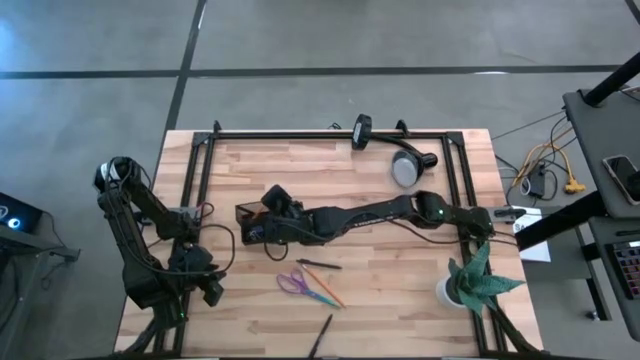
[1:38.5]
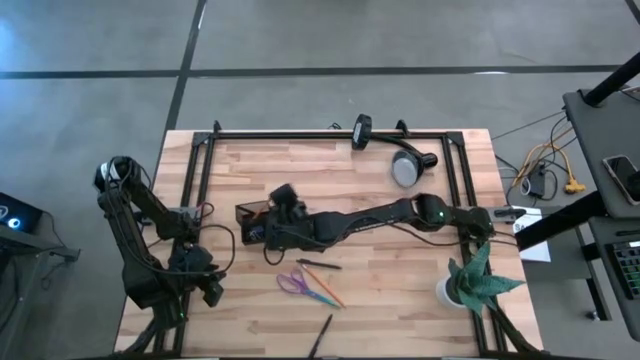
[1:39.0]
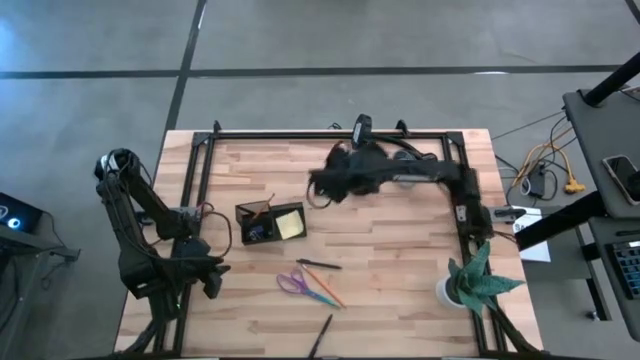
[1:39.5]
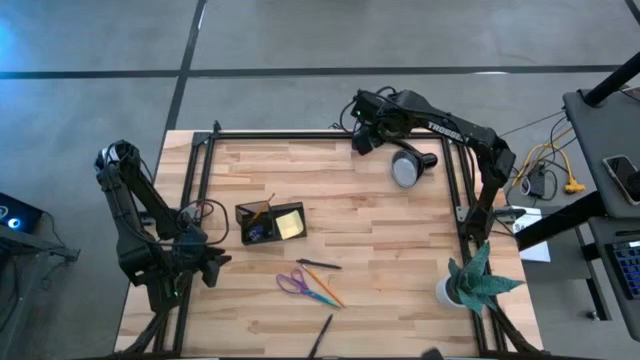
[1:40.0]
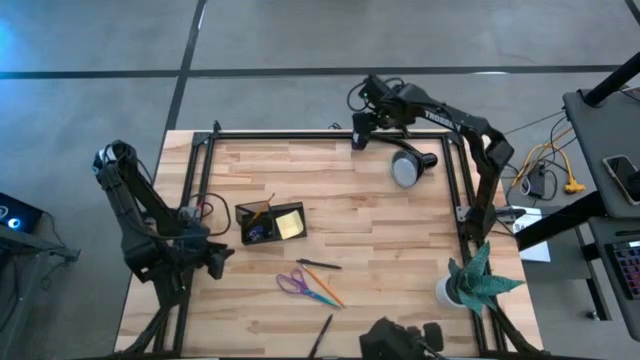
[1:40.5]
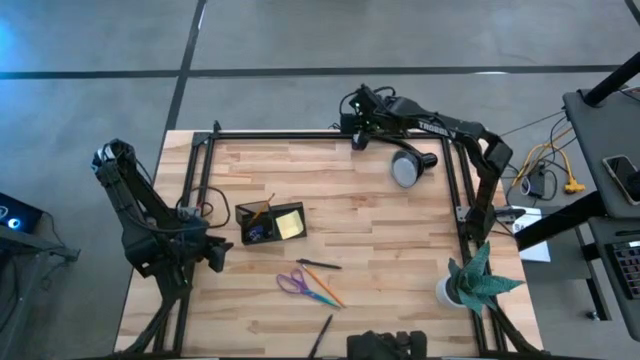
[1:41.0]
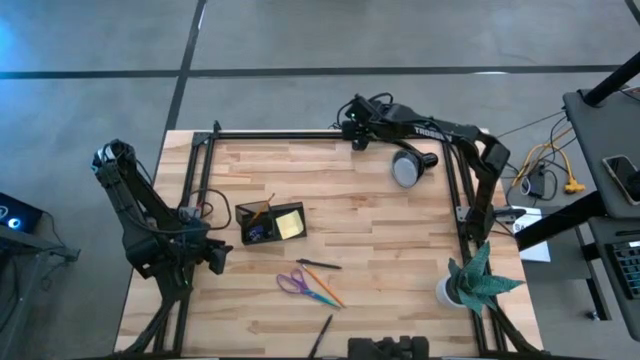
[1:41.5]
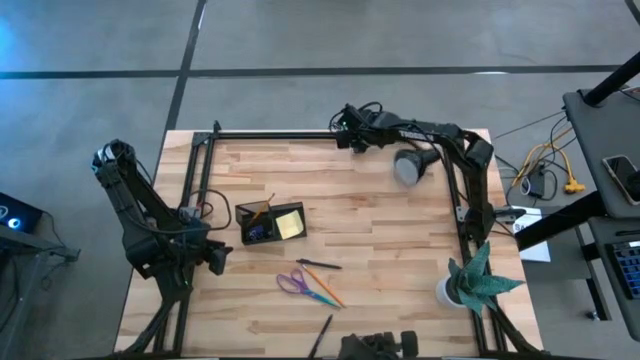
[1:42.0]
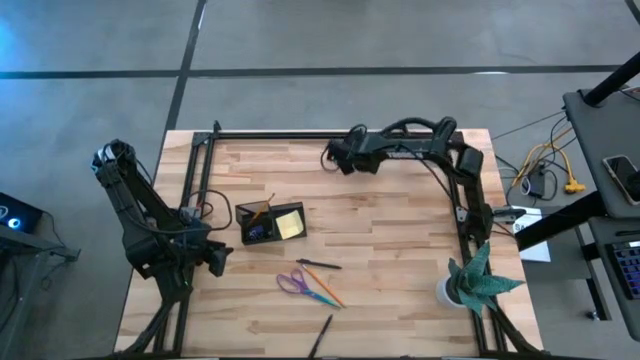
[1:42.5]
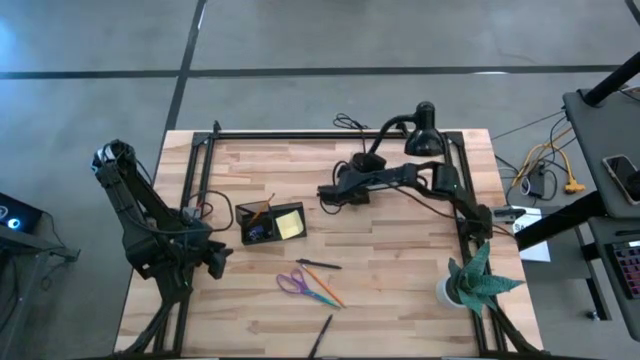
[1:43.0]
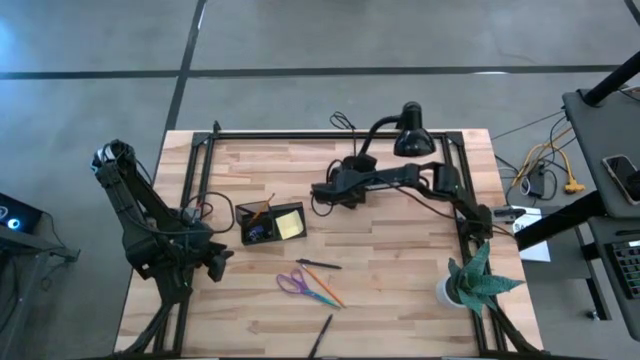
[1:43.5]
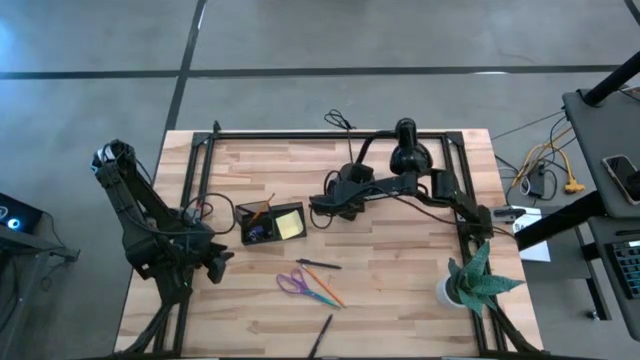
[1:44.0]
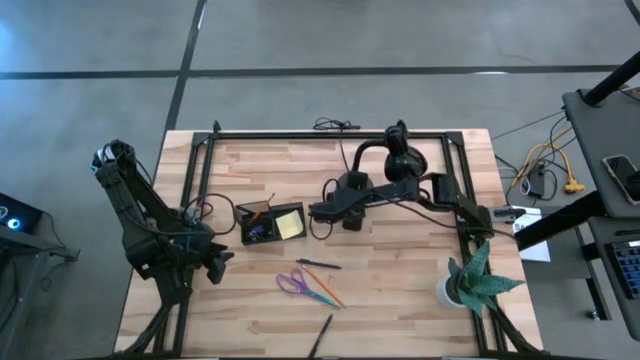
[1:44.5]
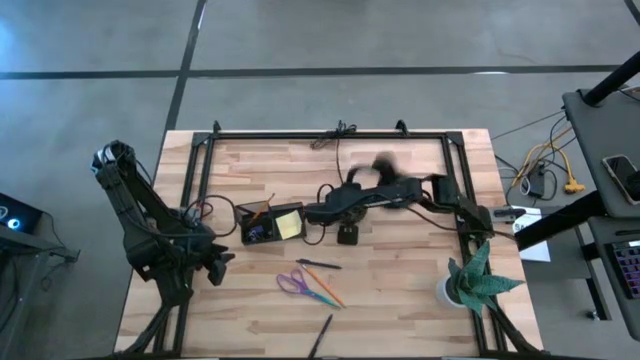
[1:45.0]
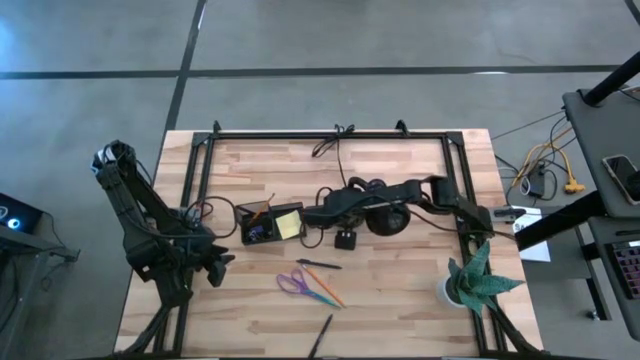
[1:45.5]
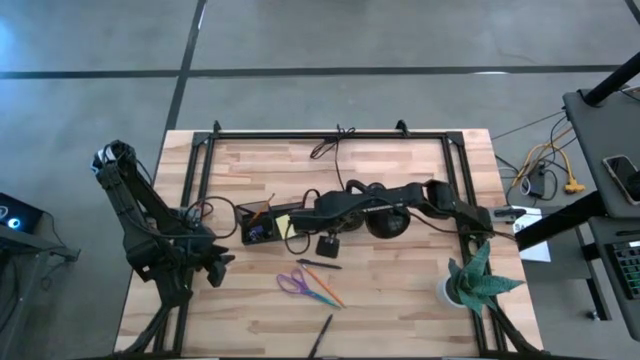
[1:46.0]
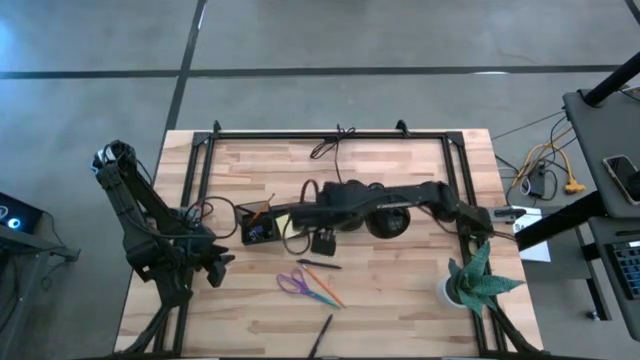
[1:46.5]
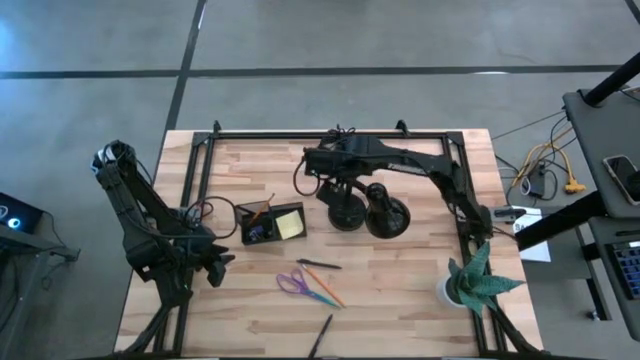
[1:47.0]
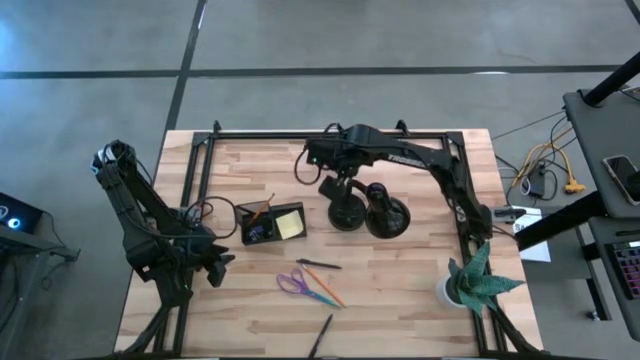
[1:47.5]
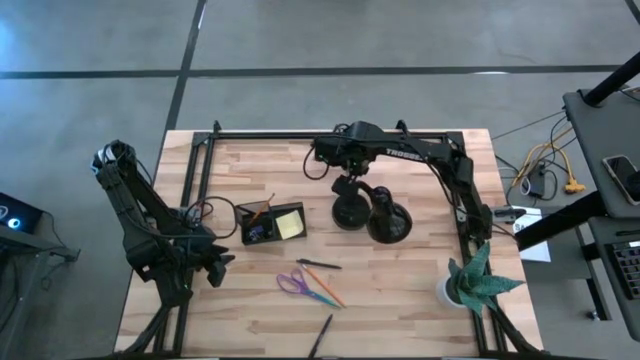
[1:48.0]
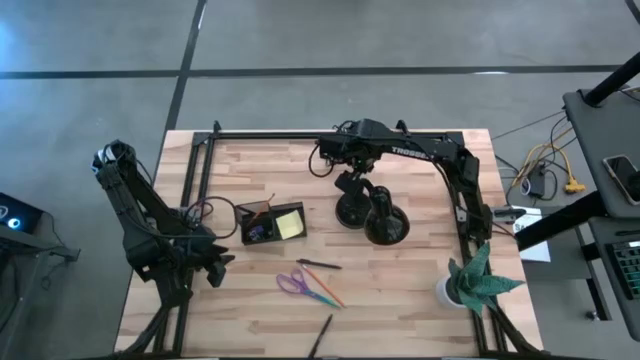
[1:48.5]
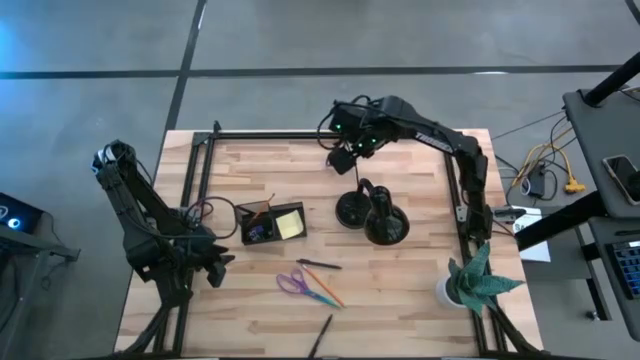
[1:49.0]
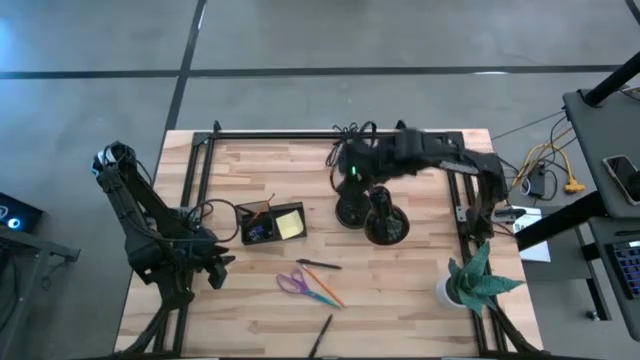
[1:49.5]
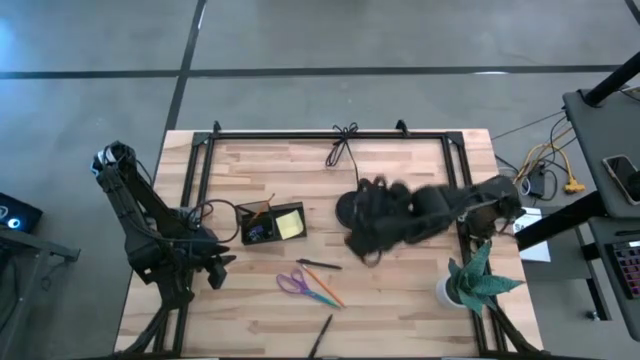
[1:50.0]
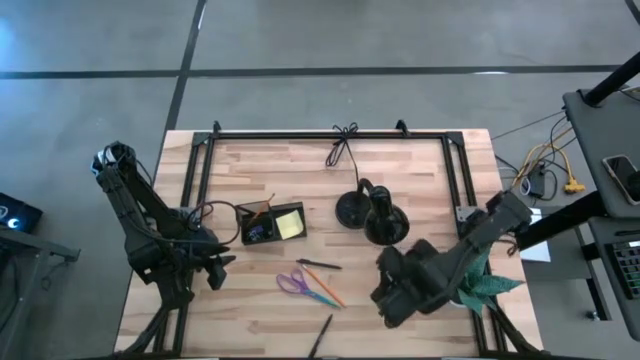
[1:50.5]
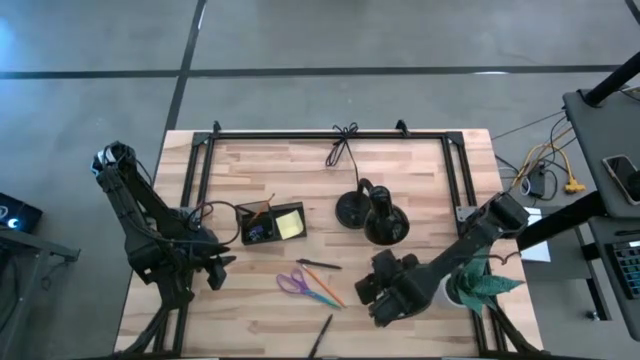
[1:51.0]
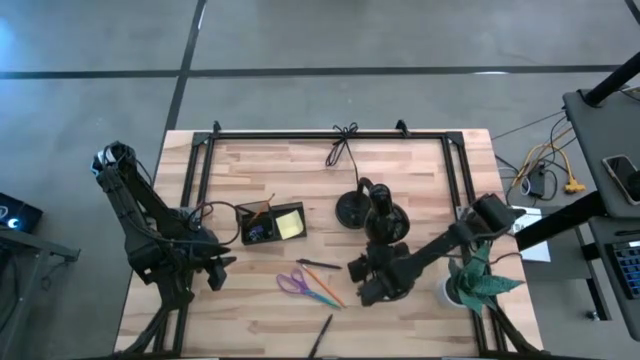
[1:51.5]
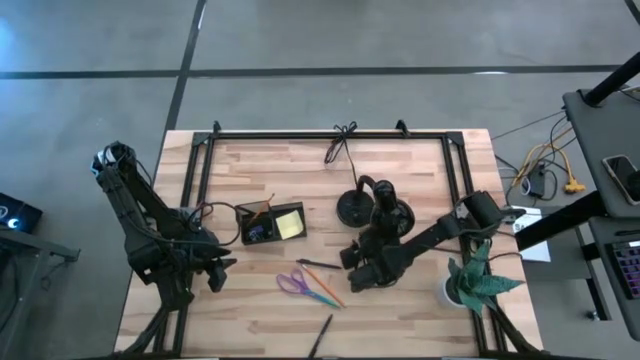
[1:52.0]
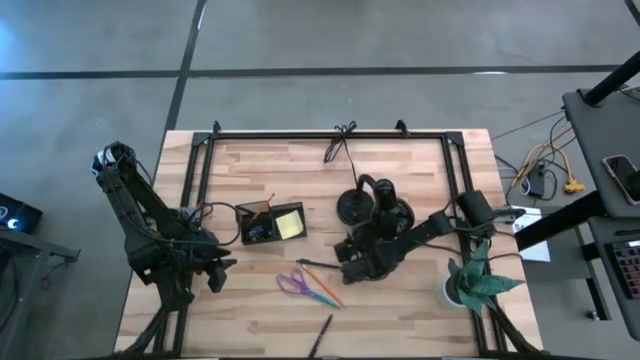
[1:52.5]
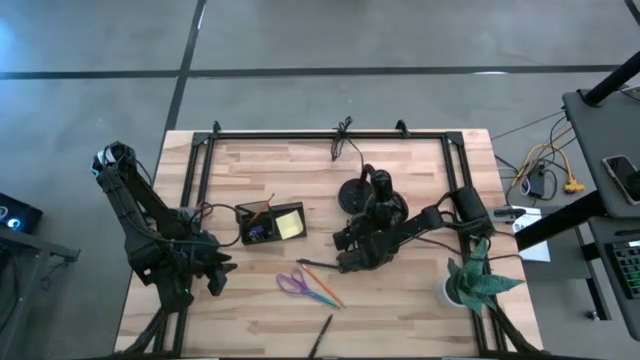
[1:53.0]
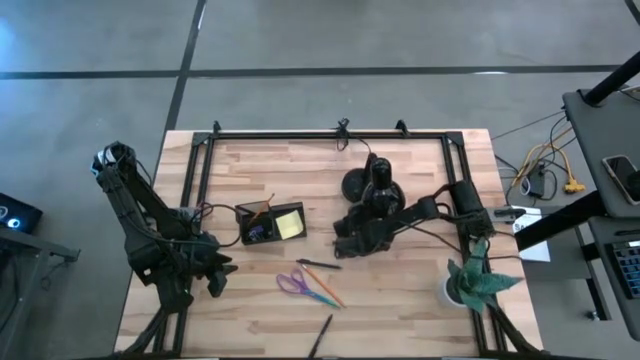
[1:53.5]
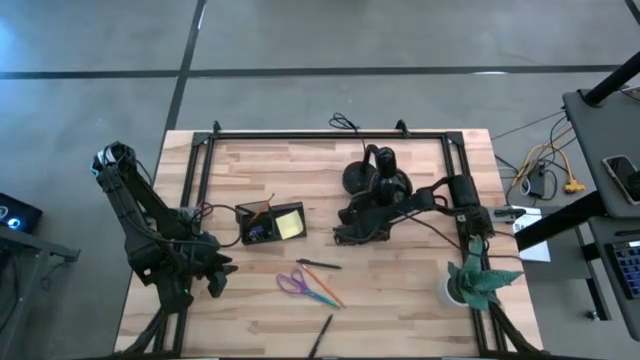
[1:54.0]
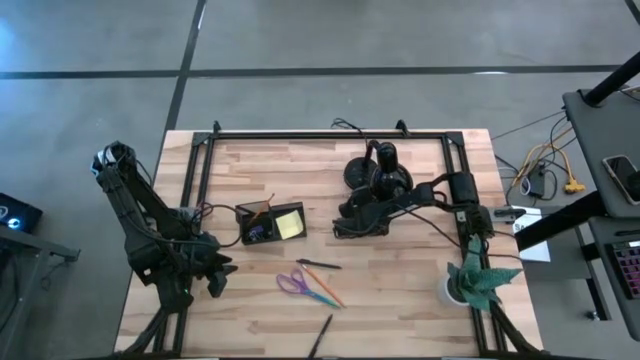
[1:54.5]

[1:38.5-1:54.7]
Task: Pick and place office supplies into organizer
Adjust the black lamp

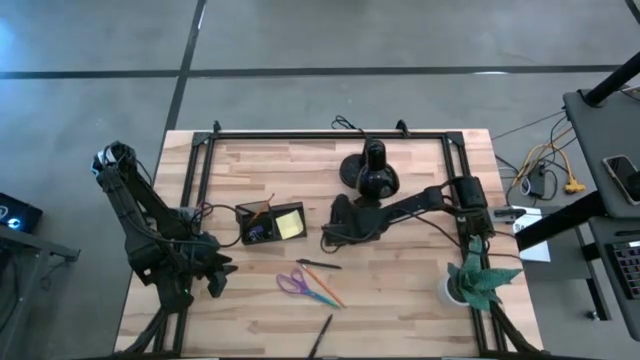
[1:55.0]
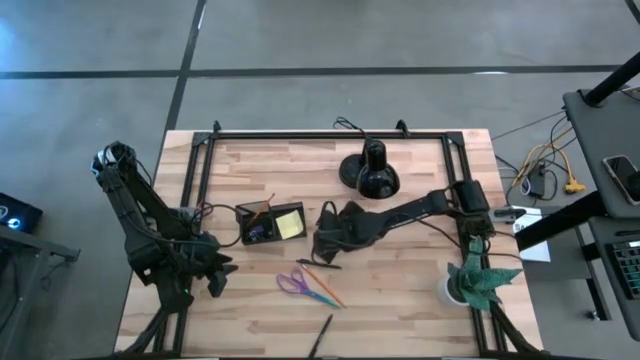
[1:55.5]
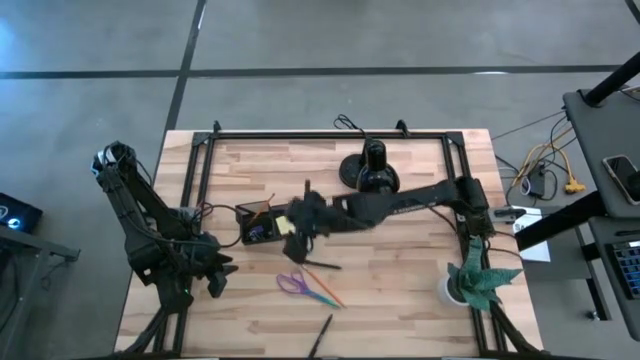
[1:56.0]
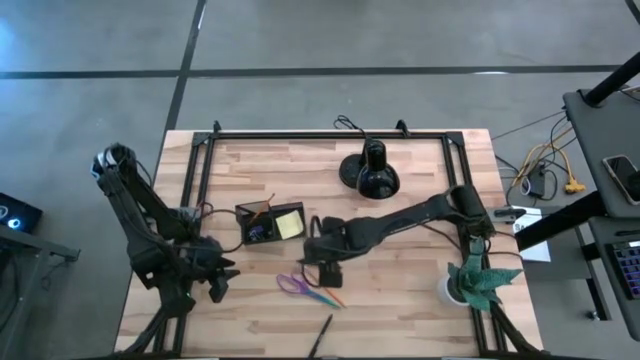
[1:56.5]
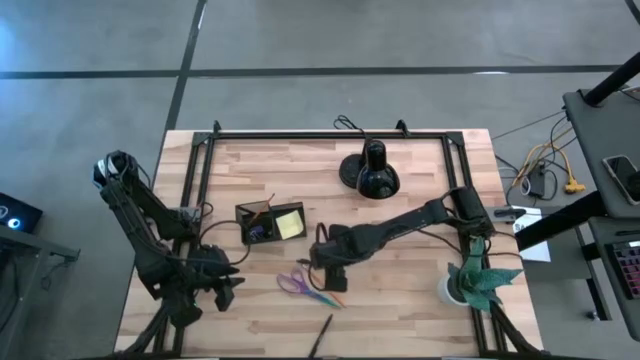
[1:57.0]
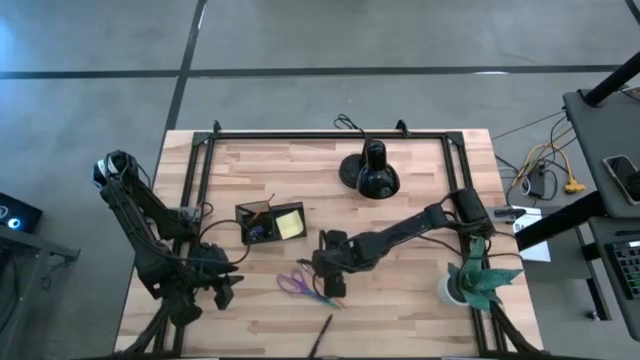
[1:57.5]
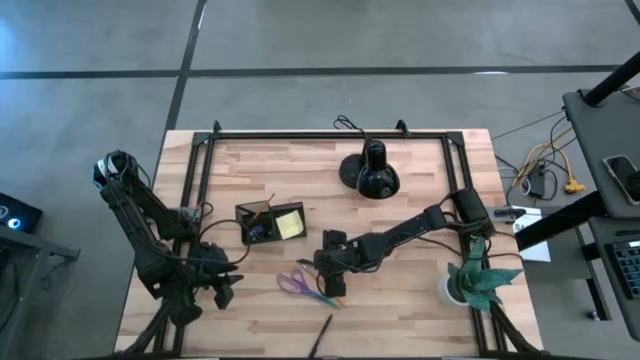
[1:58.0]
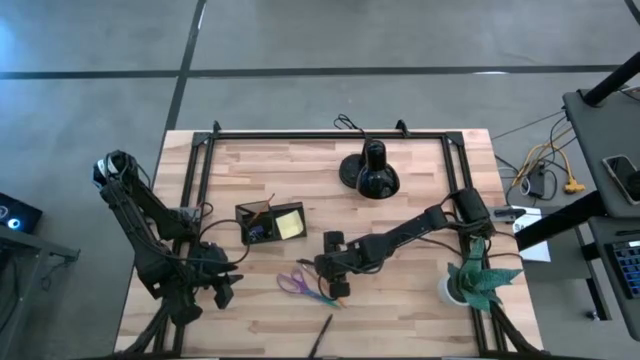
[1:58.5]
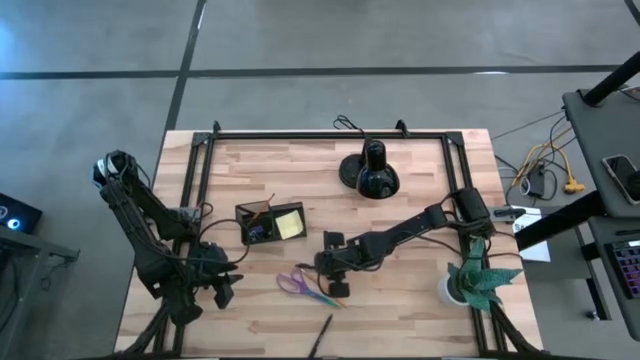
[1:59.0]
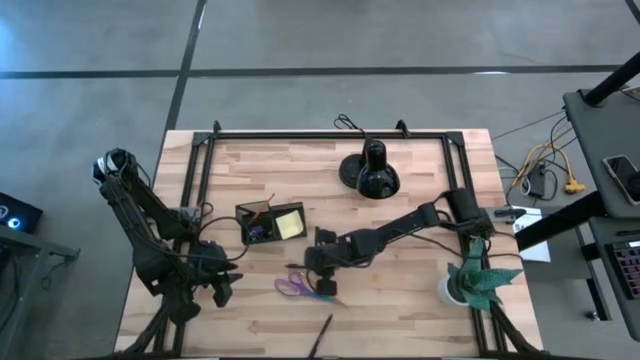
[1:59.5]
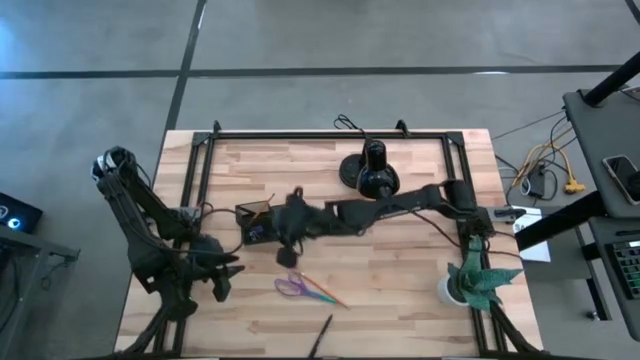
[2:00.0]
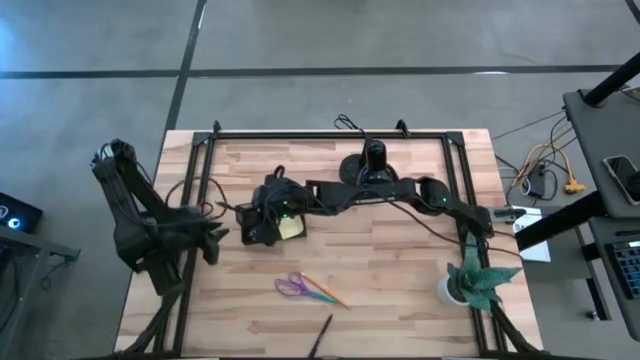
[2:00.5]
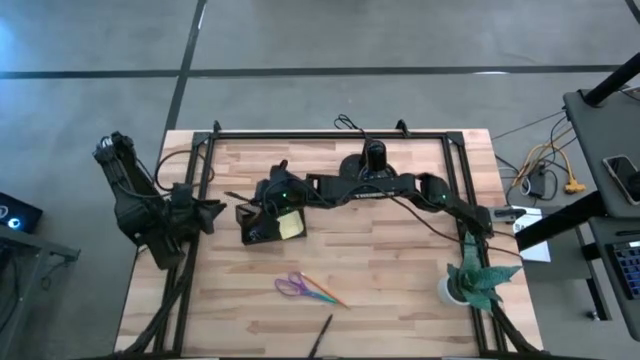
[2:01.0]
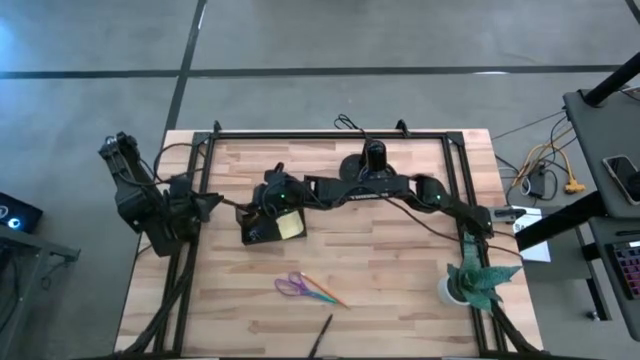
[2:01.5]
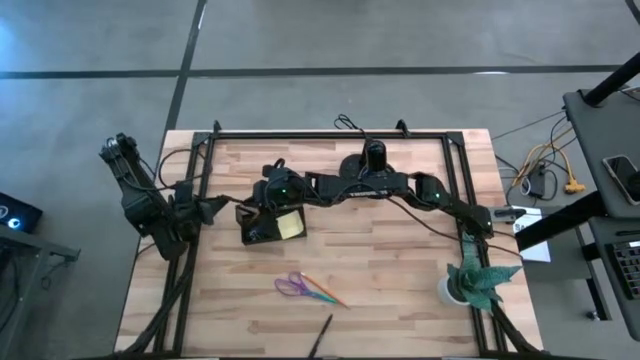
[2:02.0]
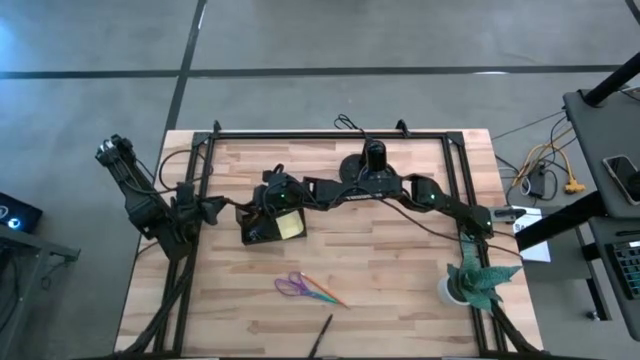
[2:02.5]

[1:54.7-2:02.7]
Put the top black pen into the black desk organizer
